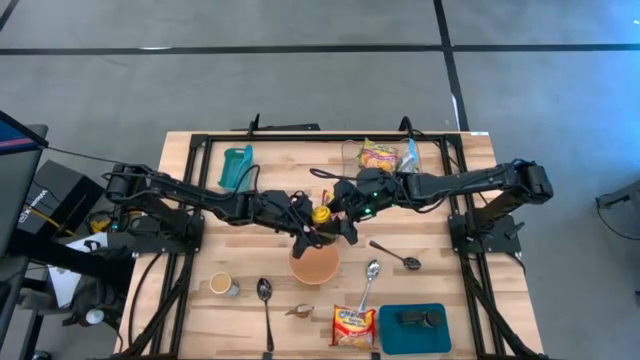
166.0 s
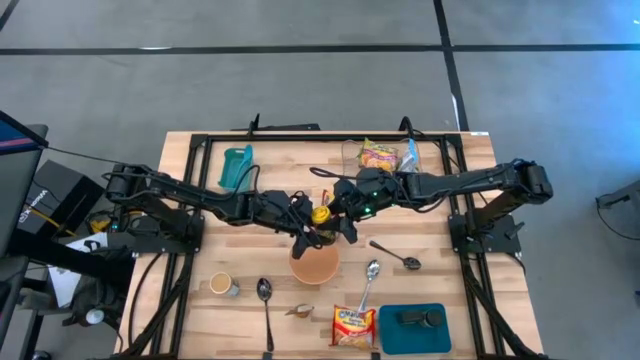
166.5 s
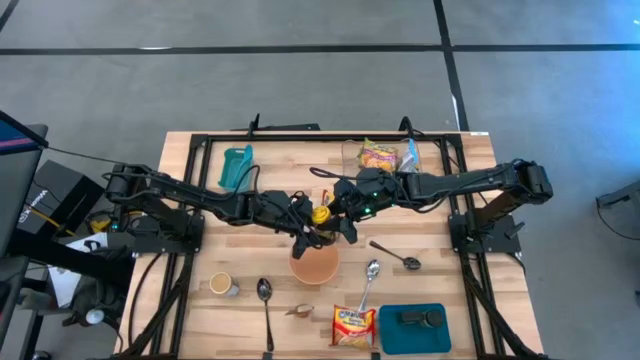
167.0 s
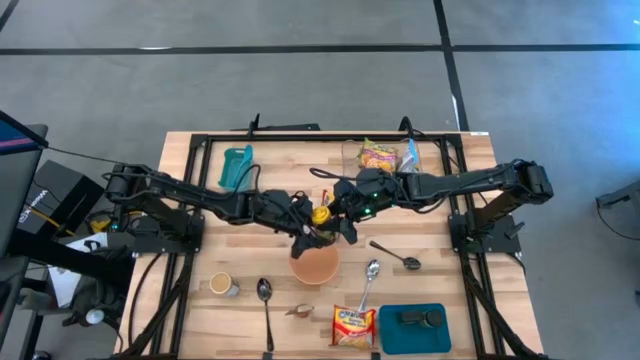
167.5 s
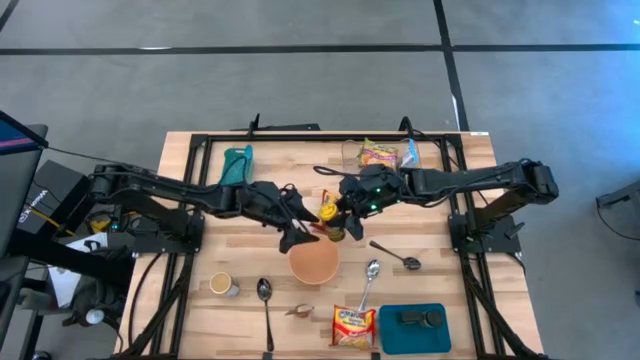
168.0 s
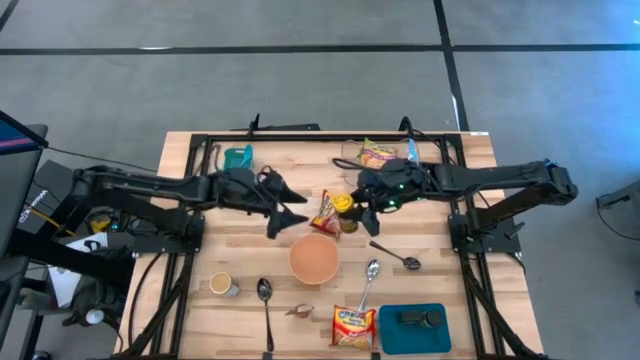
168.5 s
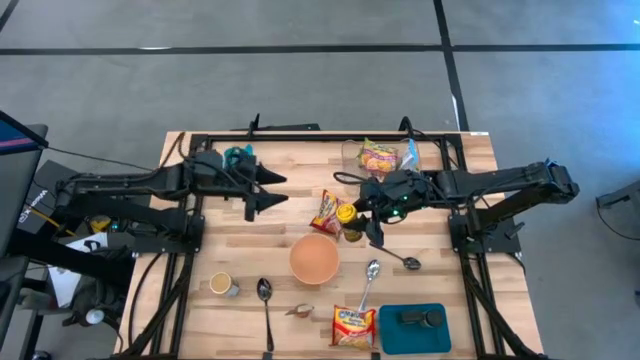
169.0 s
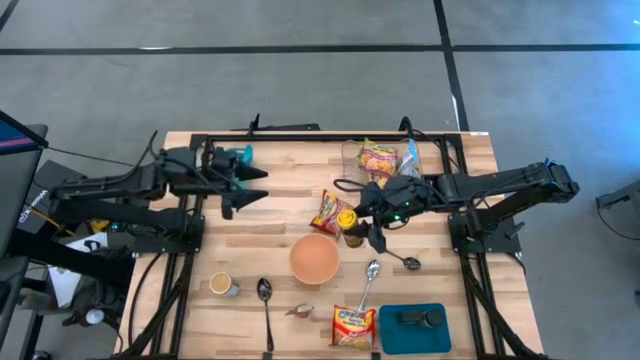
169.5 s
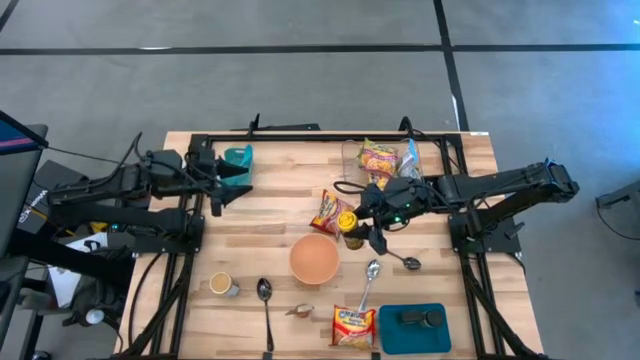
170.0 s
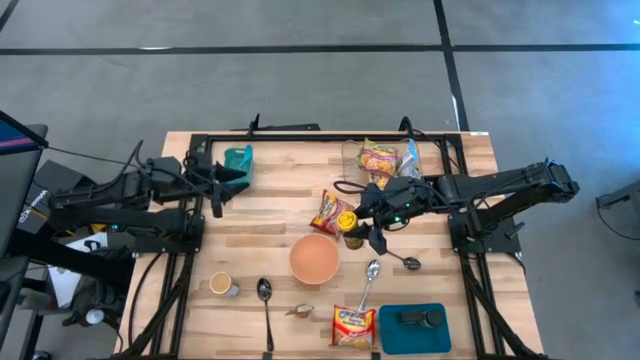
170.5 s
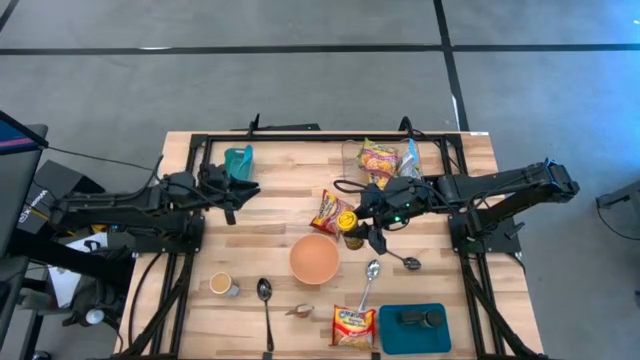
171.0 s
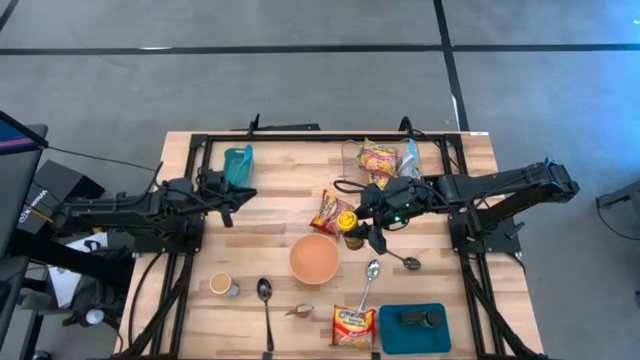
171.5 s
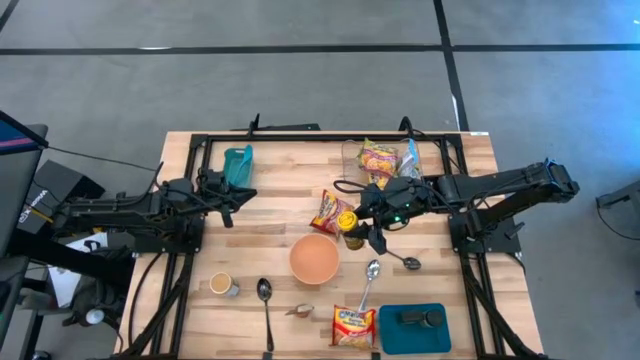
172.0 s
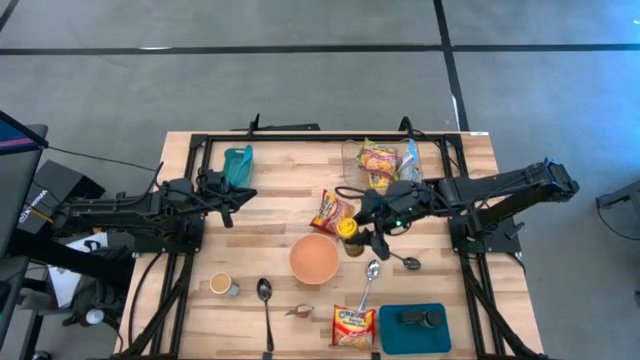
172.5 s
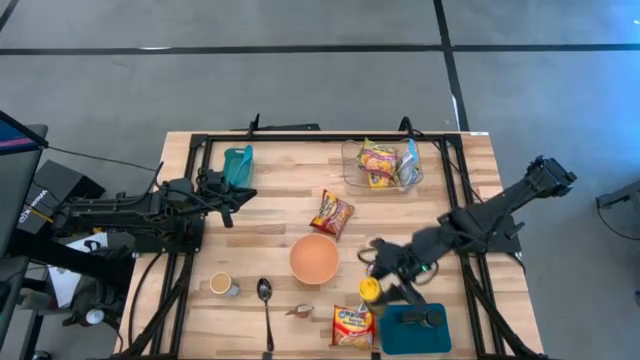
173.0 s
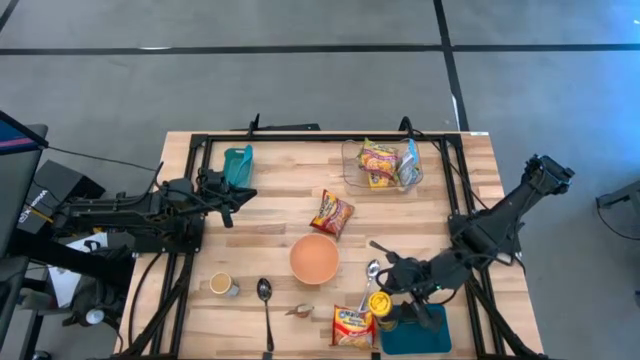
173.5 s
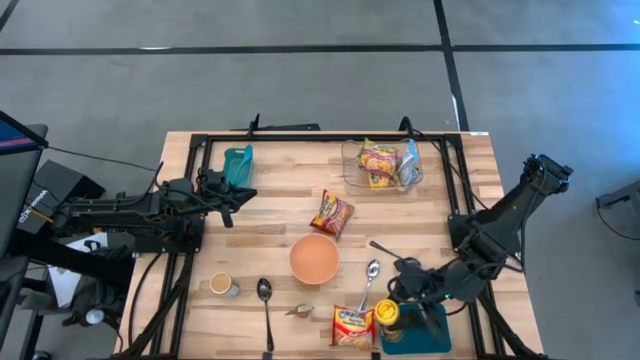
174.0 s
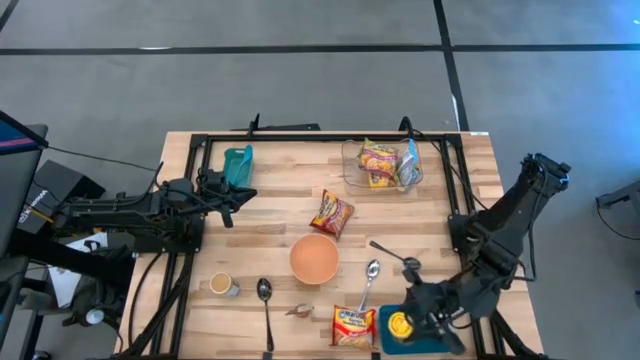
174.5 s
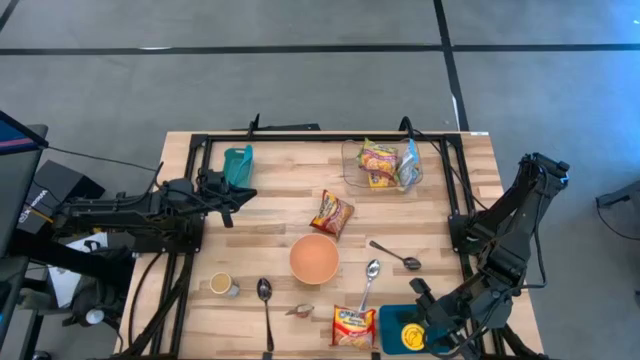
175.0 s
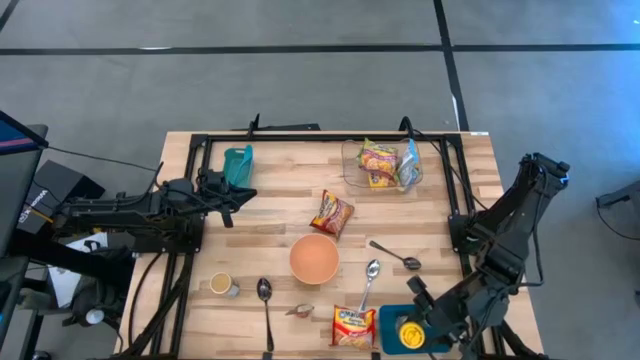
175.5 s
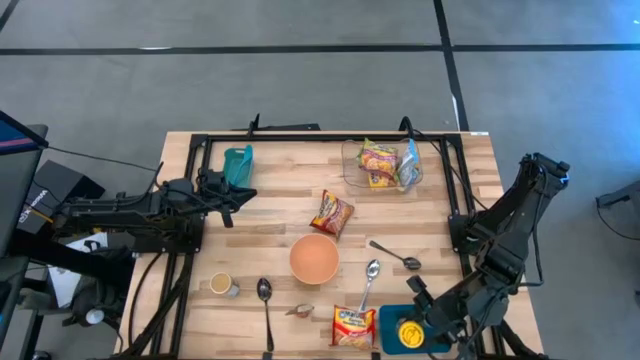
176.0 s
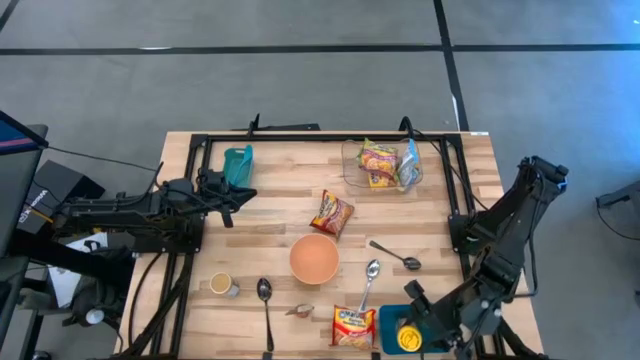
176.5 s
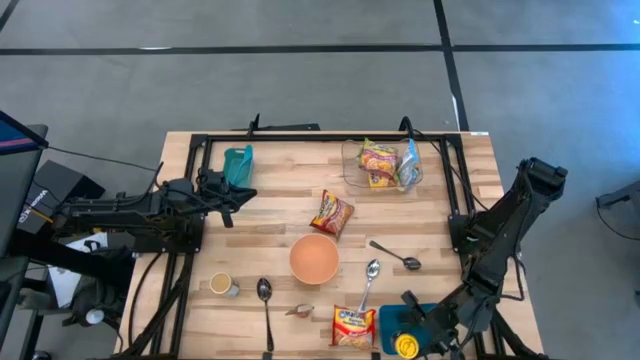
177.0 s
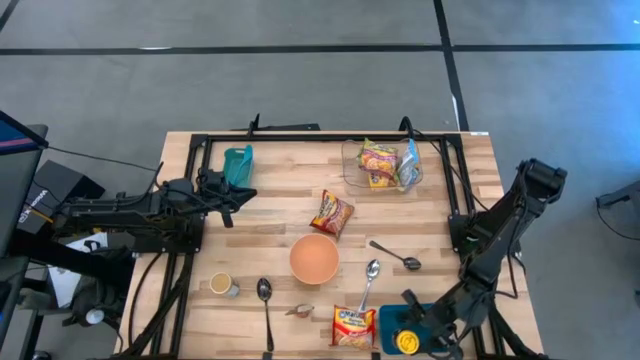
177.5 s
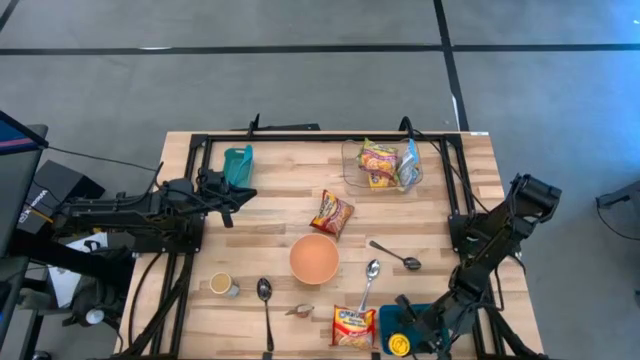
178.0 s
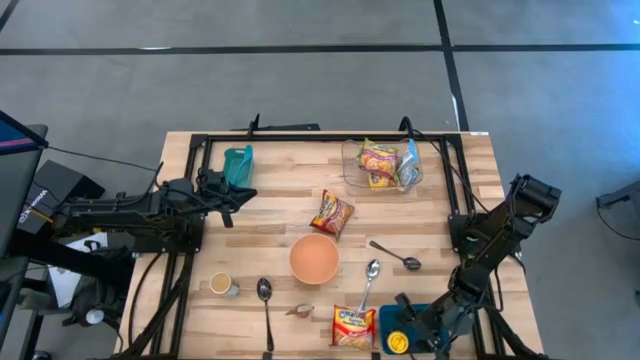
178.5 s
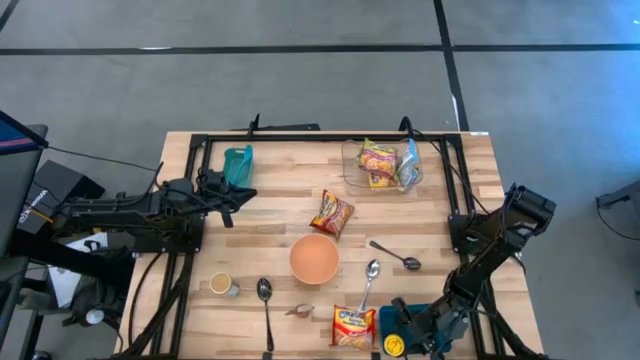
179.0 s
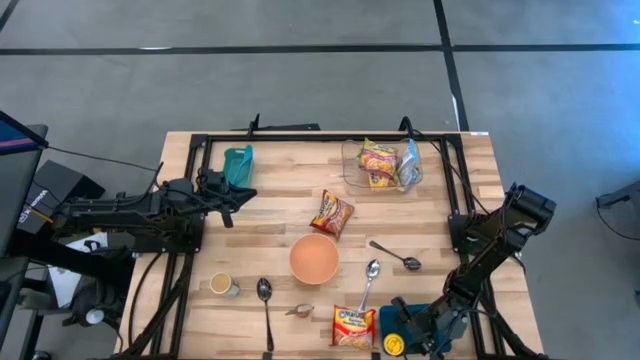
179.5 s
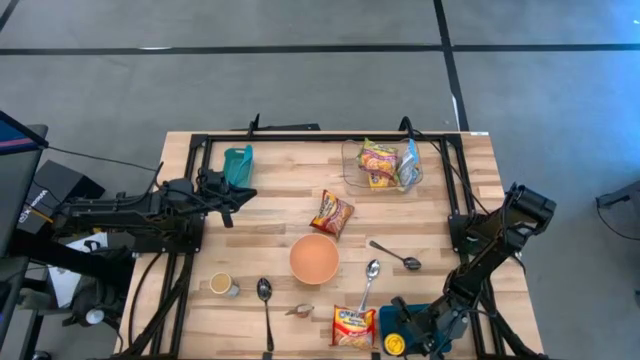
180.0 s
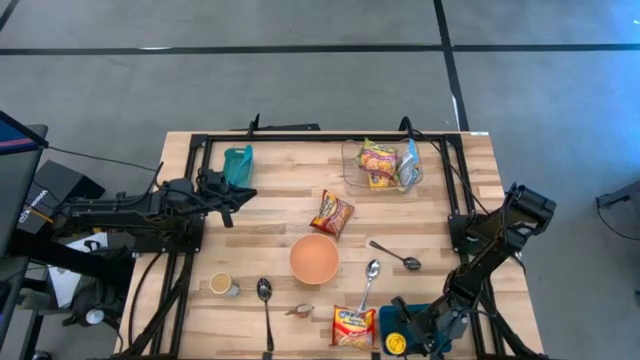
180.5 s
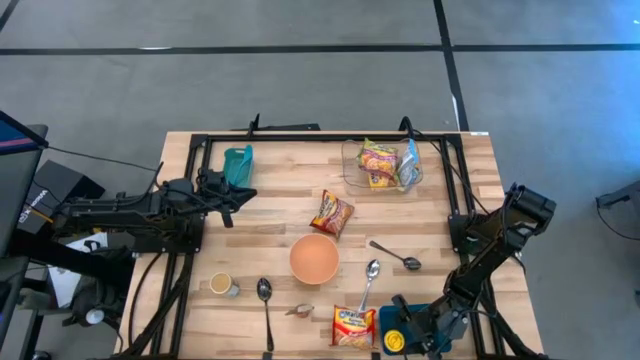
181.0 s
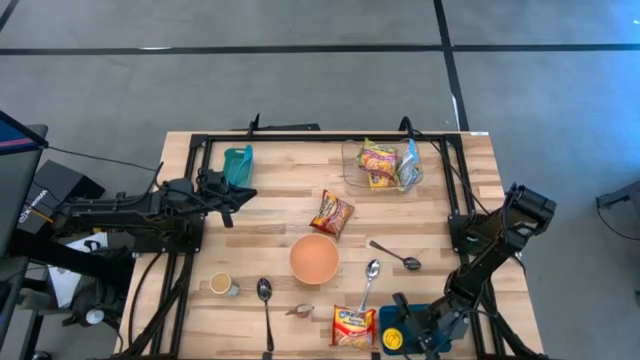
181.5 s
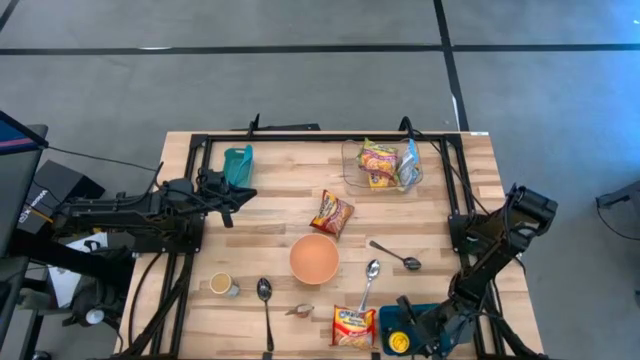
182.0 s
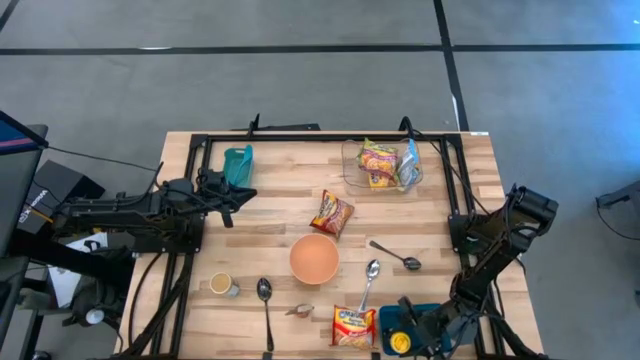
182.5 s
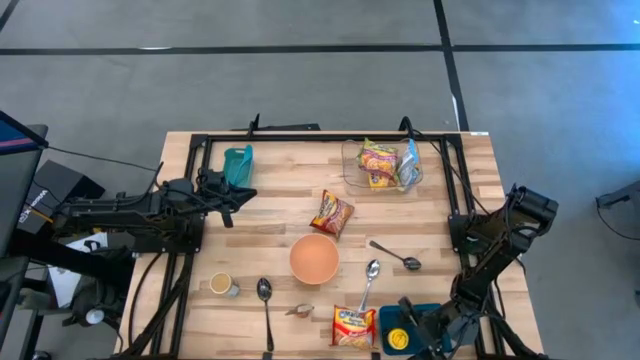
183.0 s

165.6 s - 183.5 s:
Task: Pick & Place Food Item
Put the yellow seasoning can into the dark blue bin

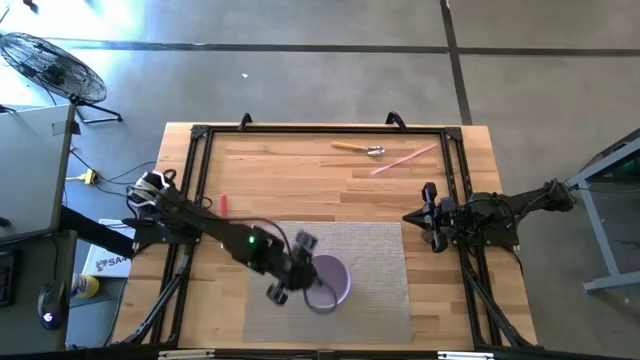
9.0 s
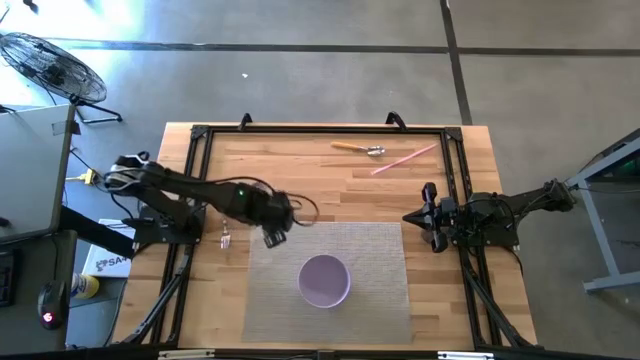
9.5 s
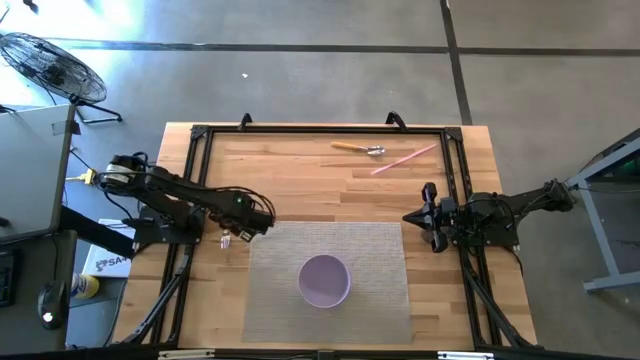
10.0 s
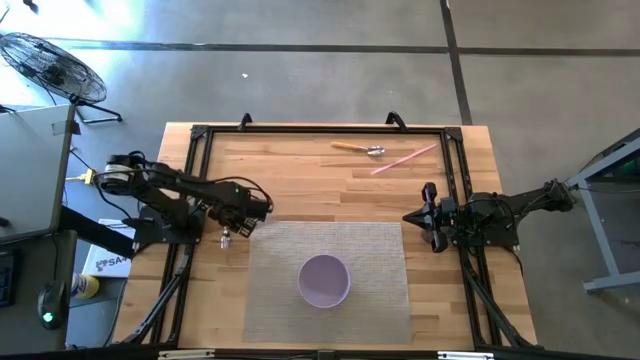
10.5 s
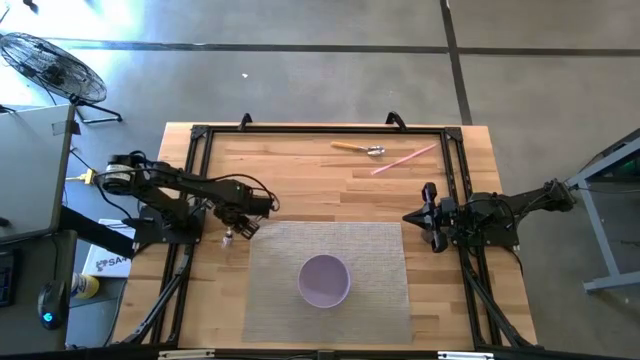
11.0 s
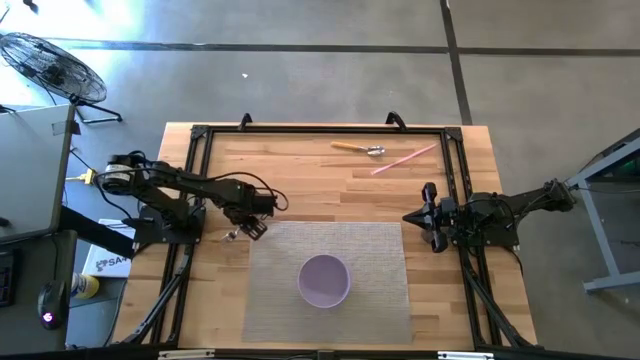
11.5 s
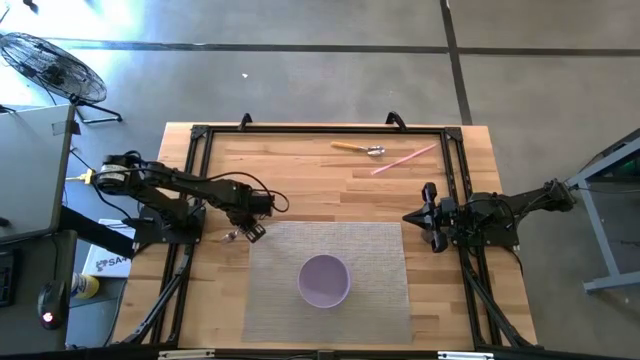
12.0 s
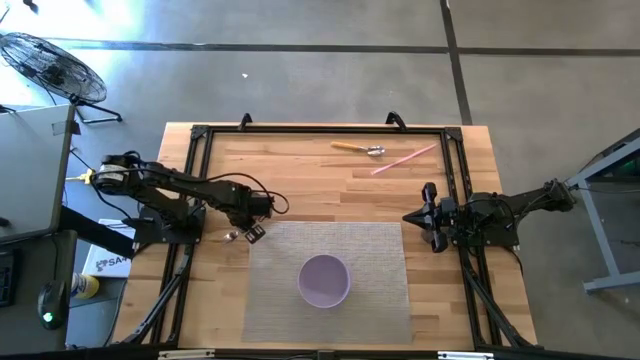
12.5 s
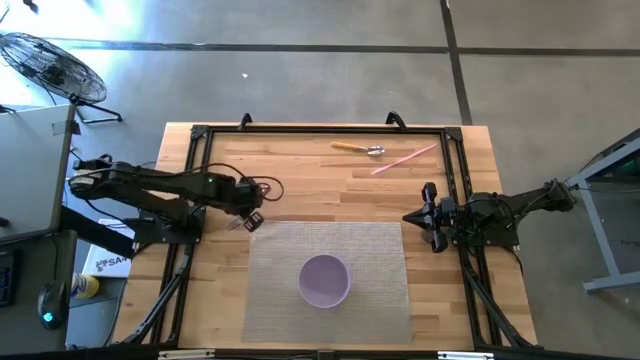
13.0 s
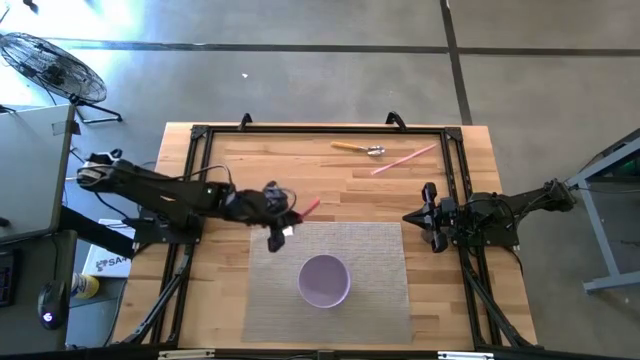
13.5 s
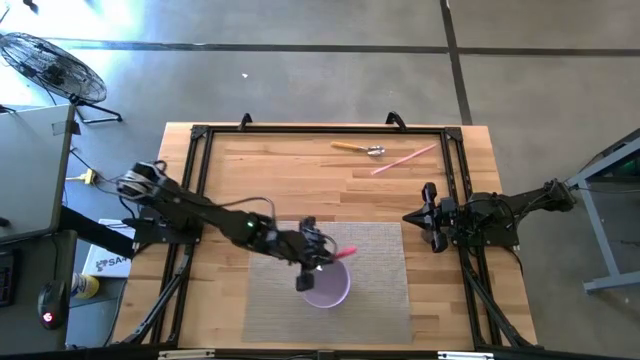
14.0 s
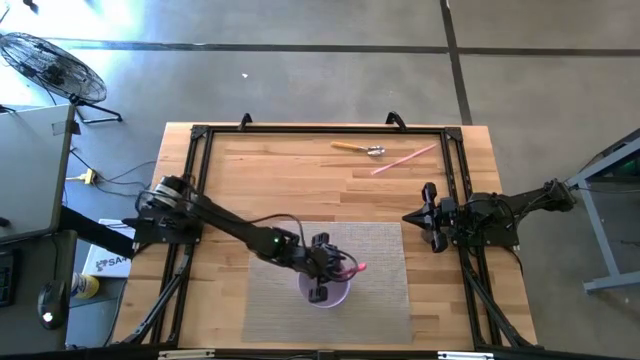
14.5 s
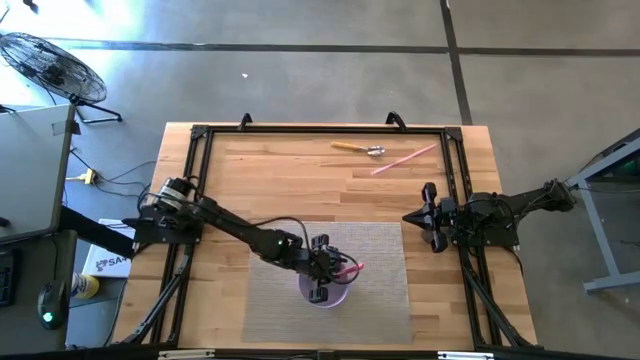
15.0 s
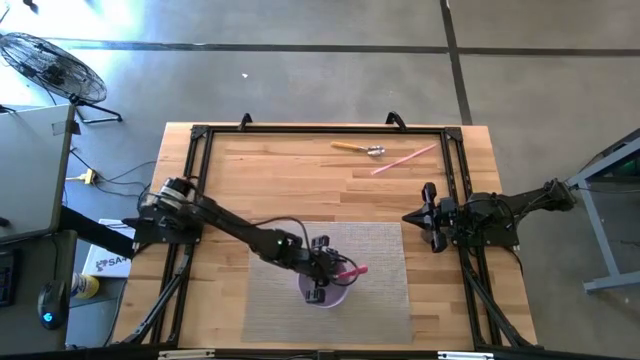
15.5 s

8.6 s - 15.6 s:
Task: Pick & Place Utensil
Put the pink fork into the purple bowl on the gray mat
